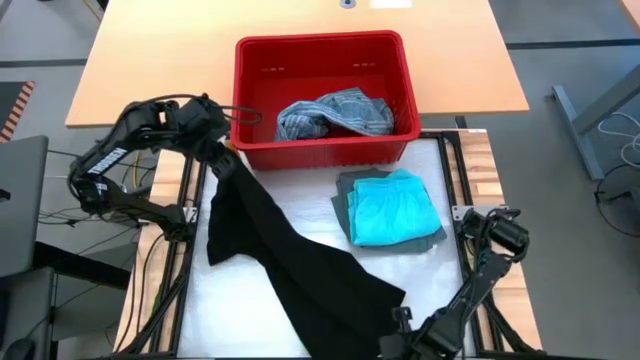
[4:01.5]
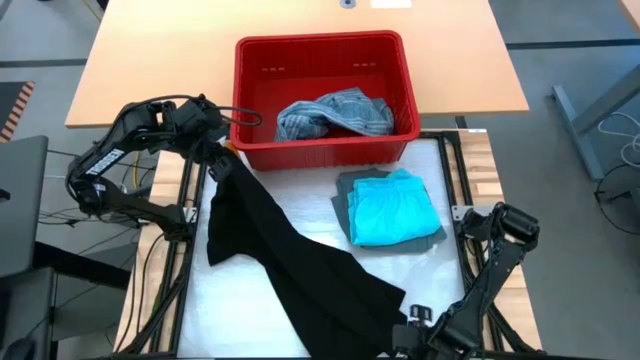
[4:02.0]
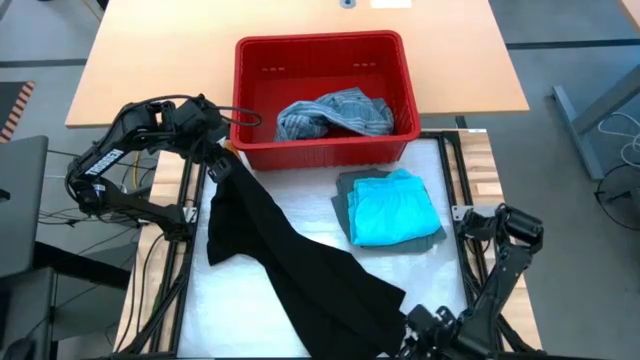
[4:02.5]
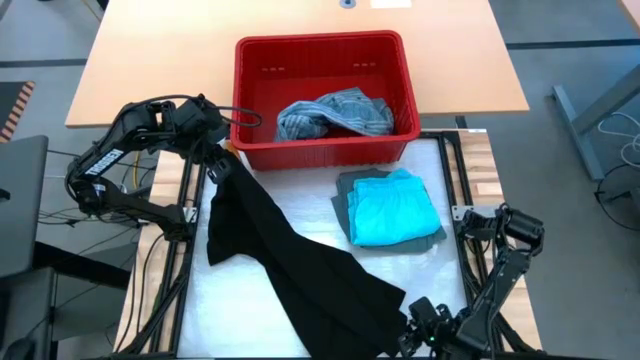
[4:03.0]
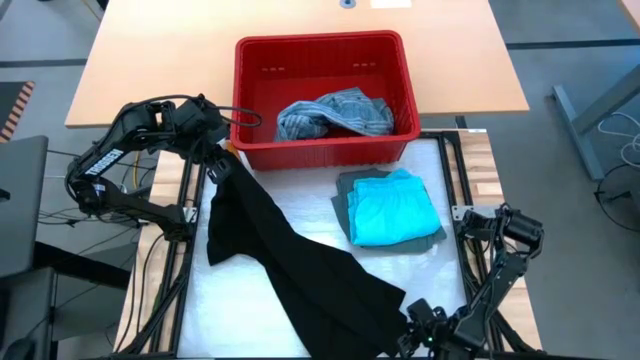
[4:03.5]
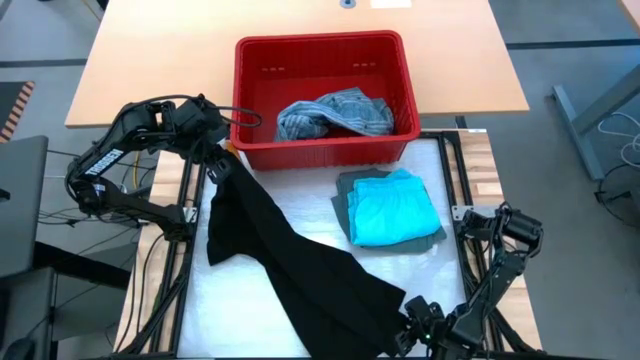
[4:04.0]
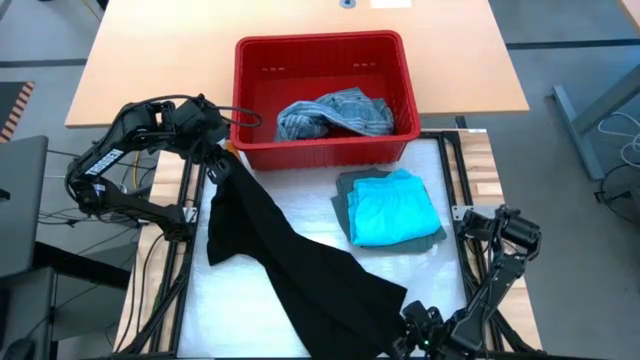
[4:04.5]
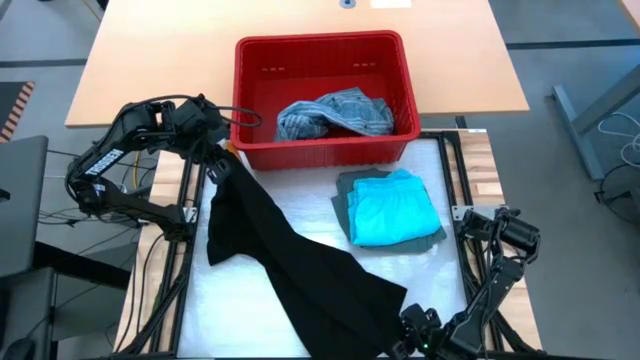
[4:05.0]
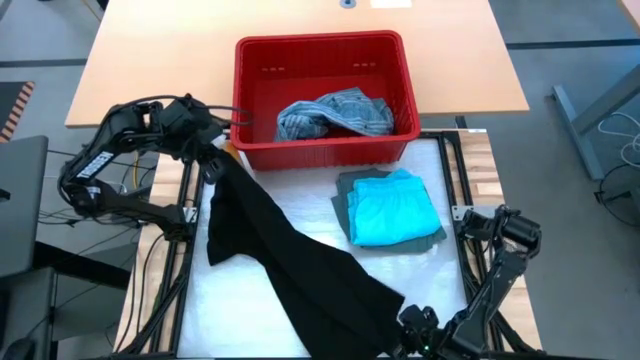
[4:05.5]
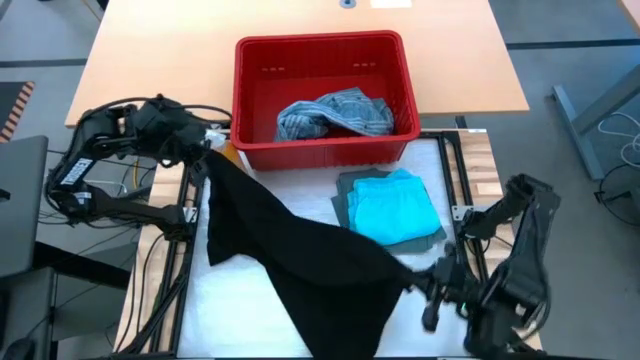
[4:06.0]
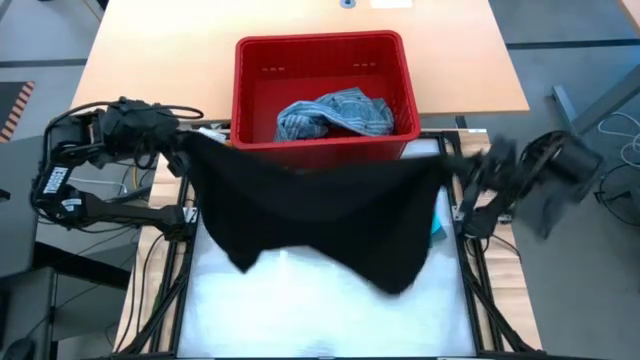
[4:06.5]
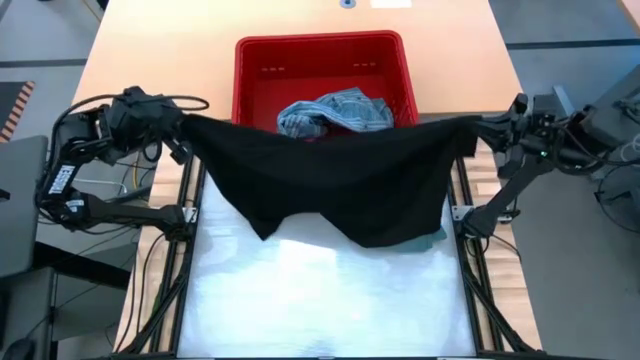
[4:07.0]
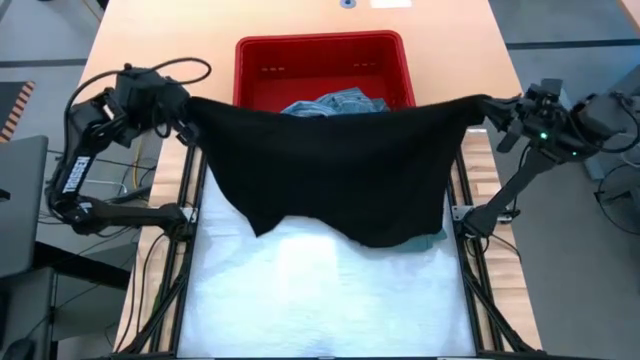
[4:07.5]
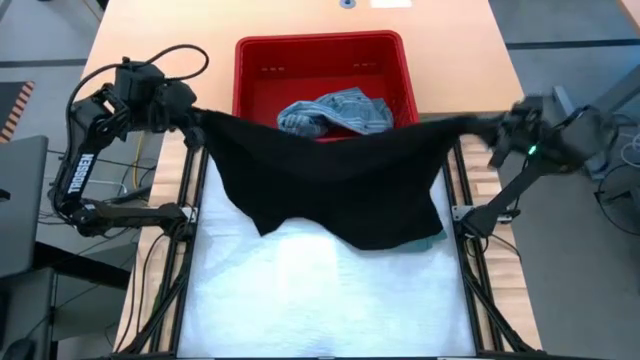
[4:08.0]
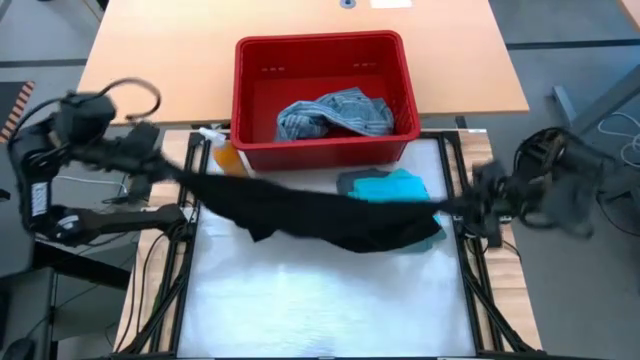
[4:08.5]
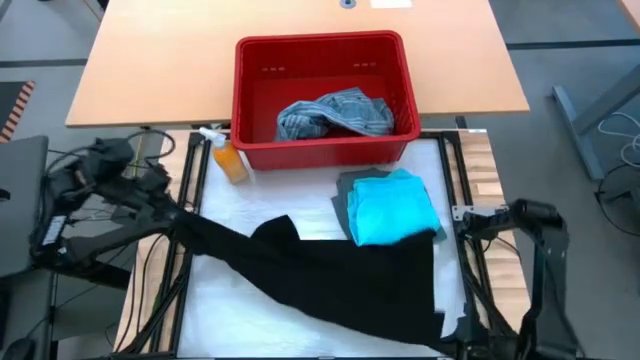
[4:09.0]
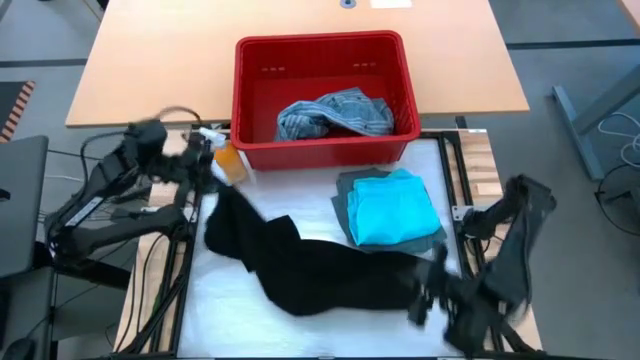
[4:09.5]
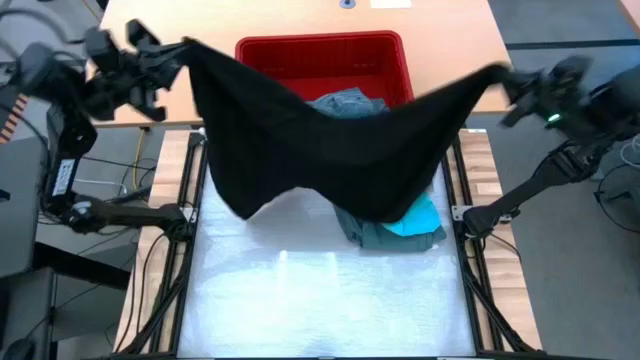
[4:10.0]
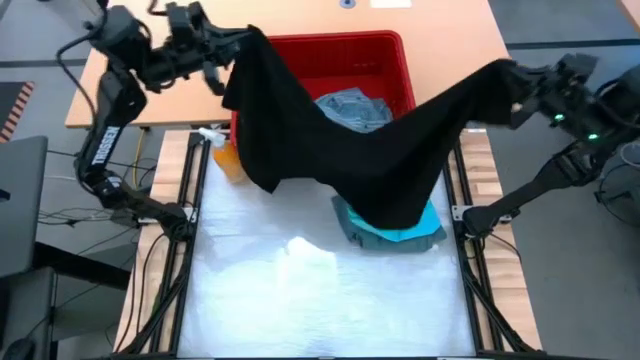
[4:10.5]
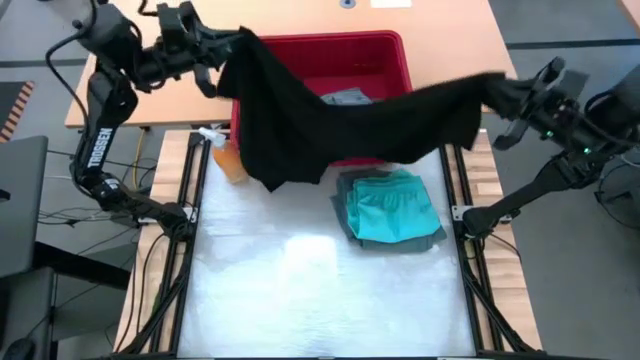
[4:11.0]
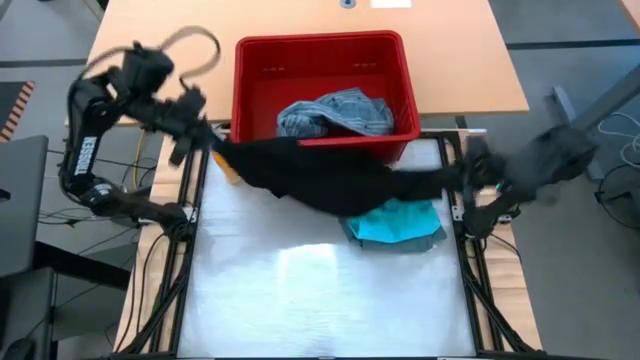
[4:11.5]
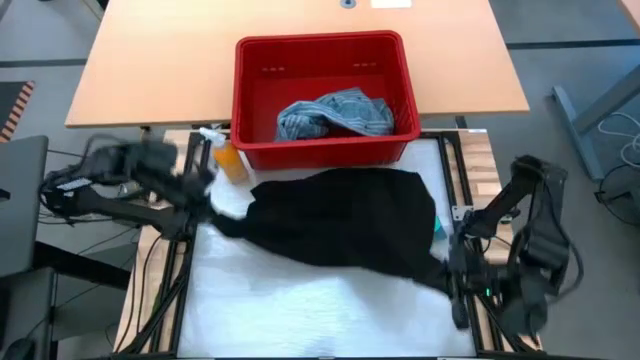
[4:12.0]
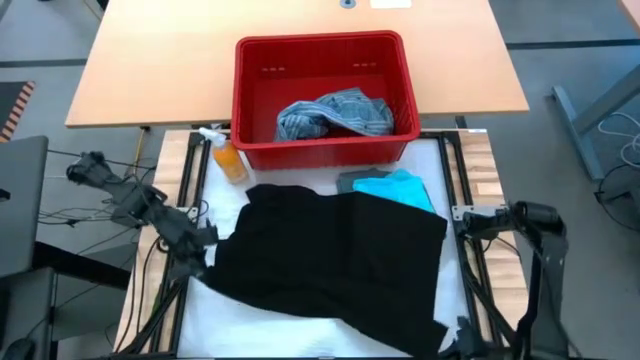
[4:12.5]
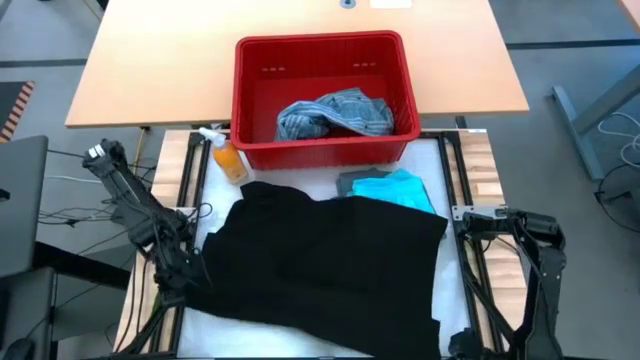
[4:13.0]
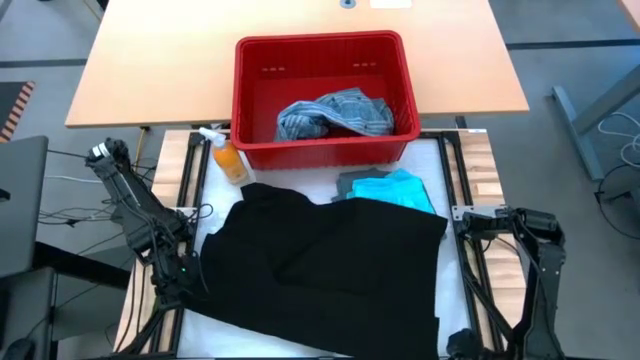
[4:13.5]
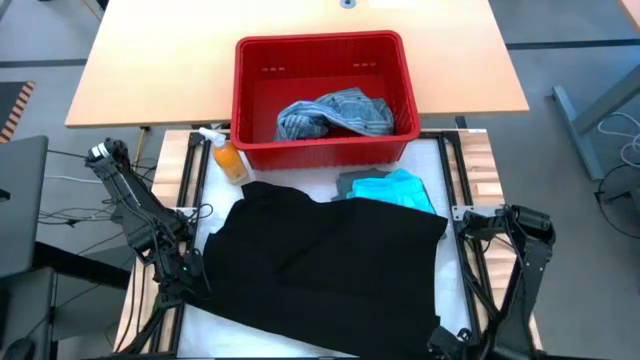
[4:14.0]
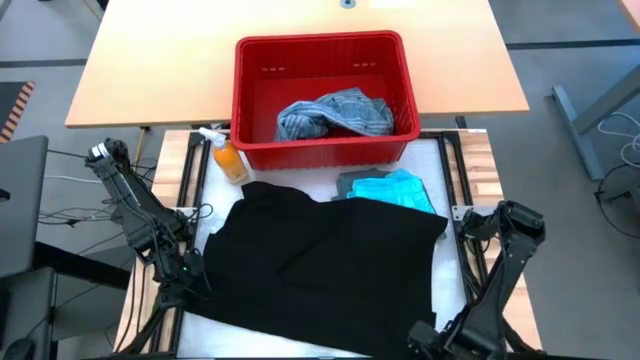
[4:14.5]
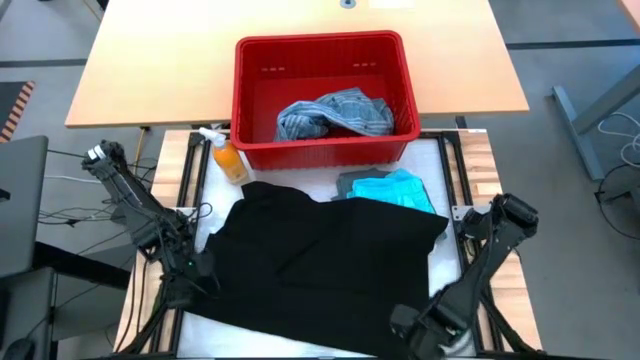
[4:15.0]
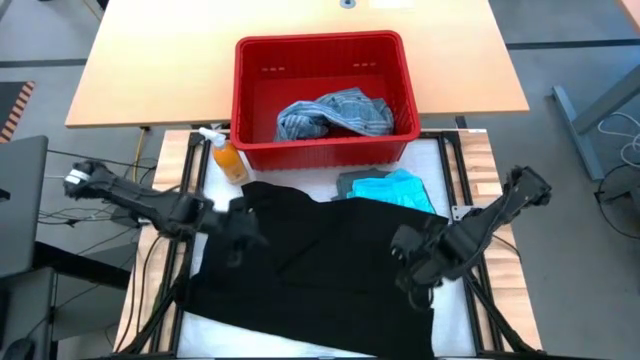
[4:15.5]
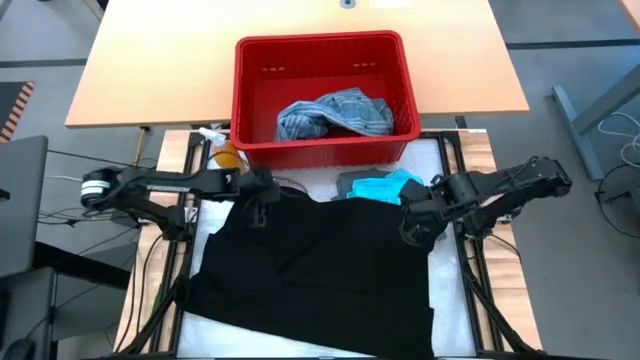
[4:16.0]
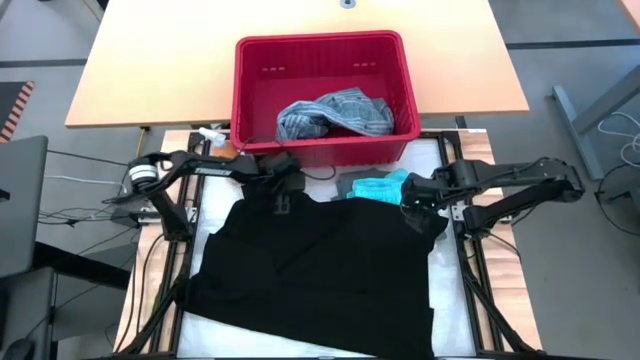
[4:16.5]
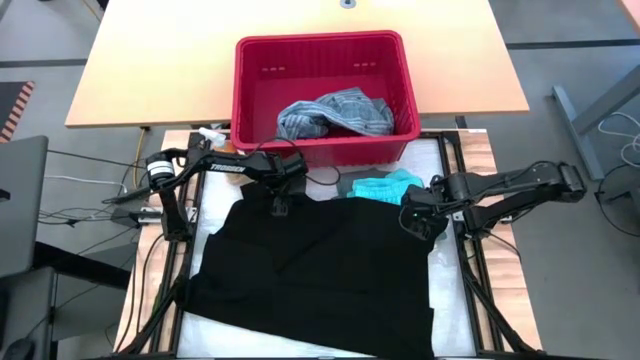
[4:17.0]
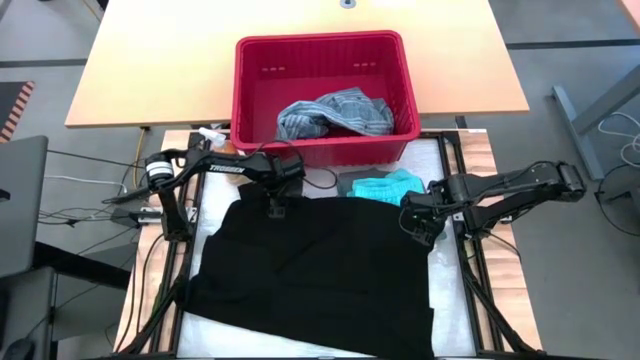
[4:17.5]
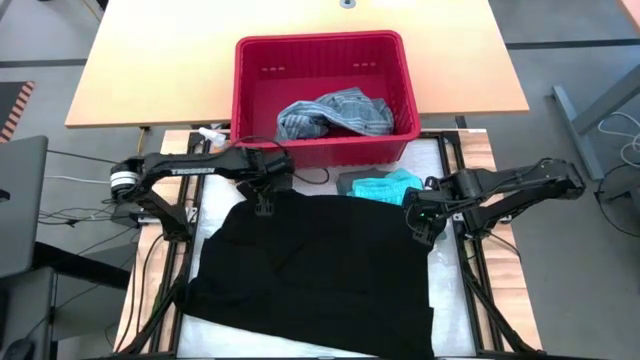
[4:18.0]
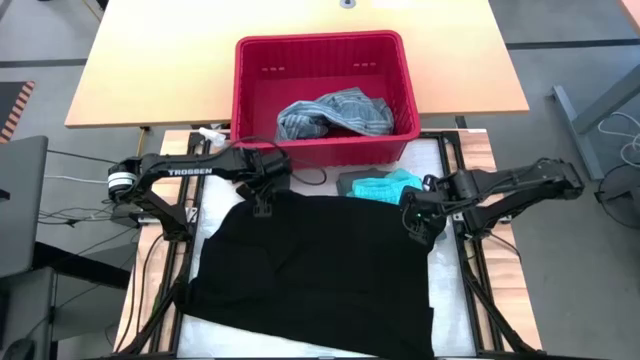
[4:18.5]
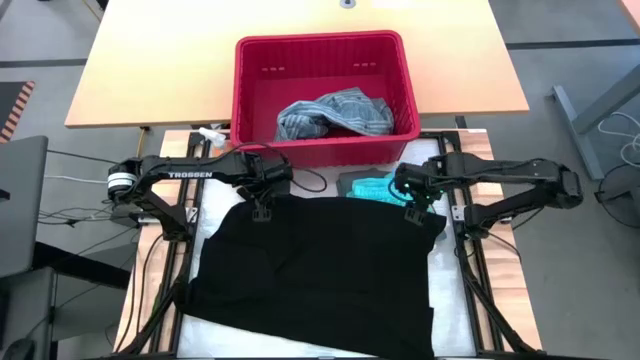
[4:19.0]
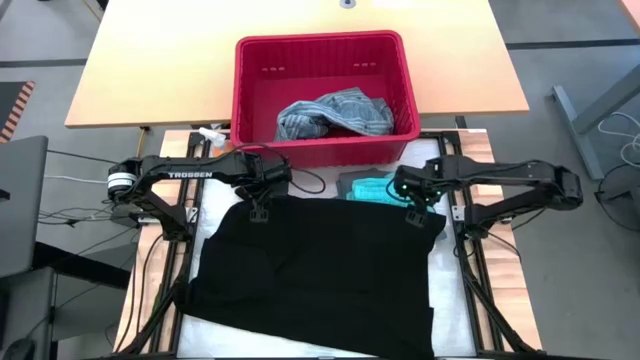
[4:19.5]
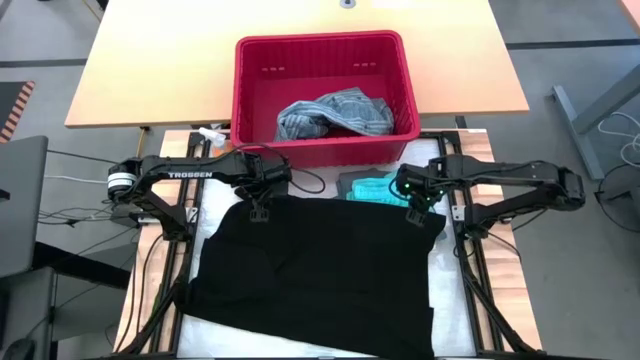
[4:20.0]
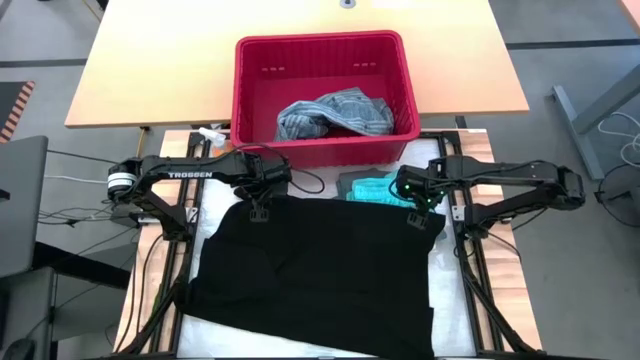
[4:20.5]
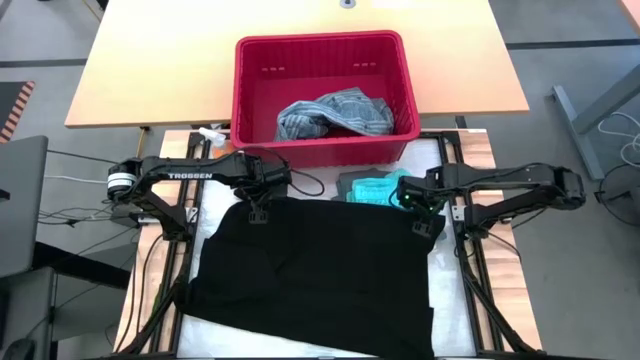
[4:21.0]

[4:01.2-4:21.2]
Task: Fold Laundry from Bin
Fold the black shirt

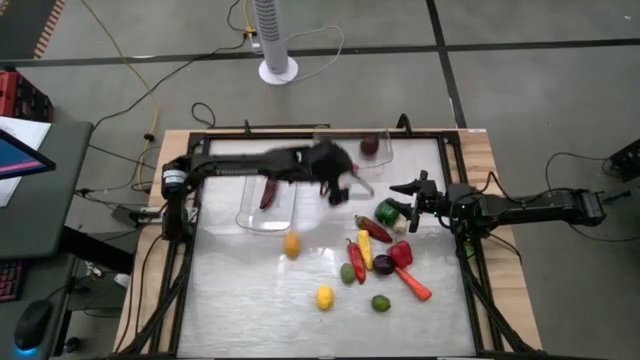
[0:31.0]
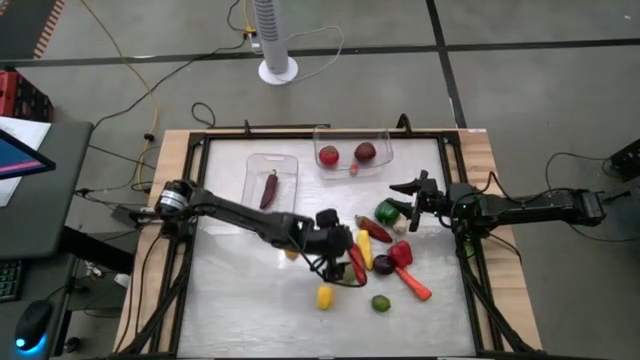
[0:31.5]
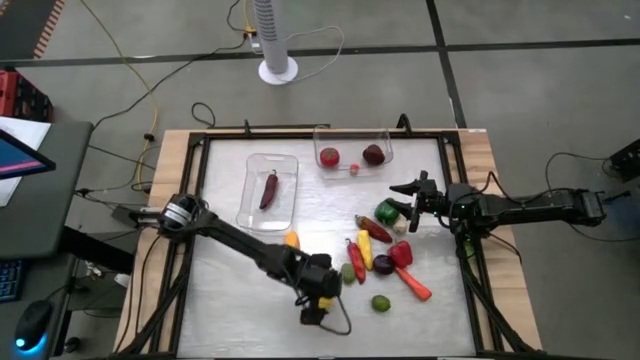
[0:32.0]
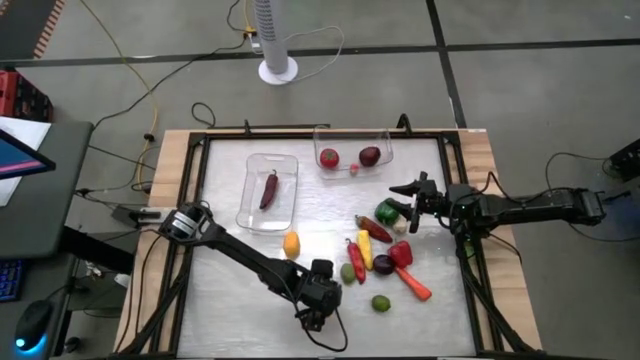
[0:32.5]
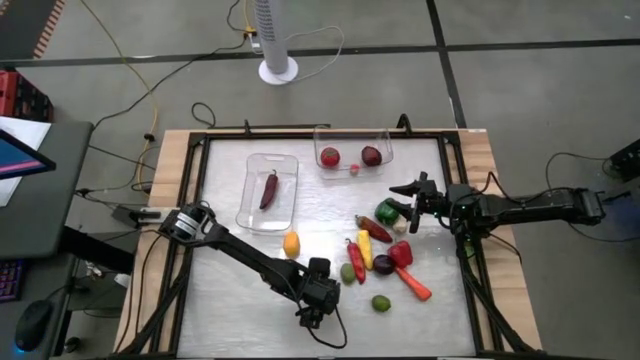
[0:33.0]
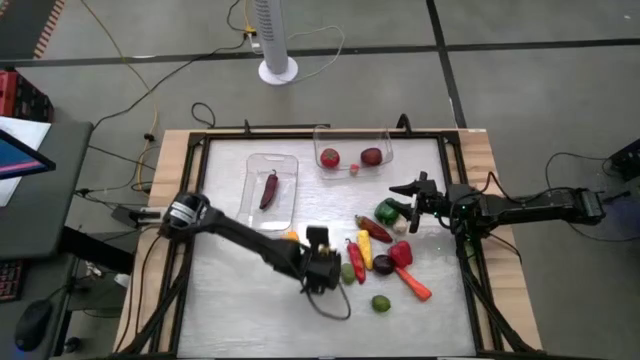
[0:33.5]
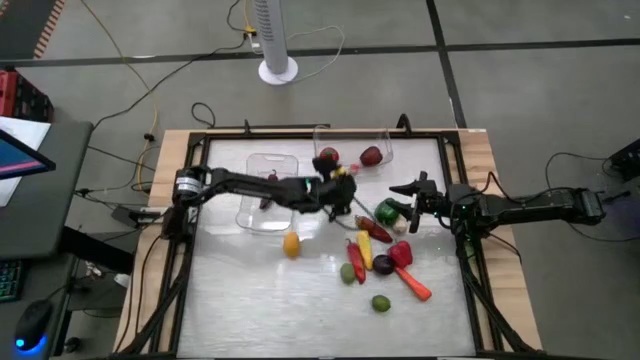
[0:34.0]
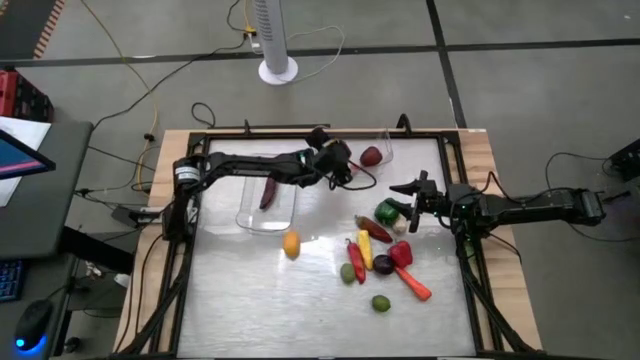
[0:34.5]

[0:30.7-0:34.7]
Task: Sort produce into baskets
Put the bottom yellow lemon into the right transparent bin
